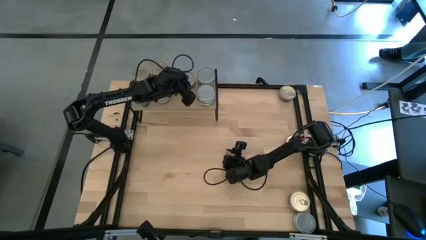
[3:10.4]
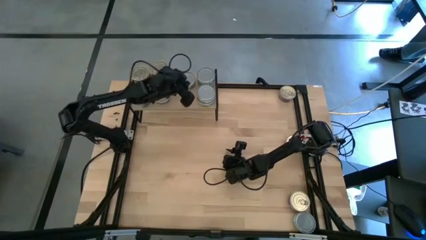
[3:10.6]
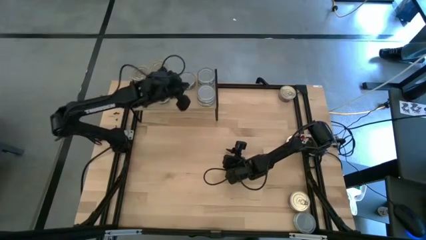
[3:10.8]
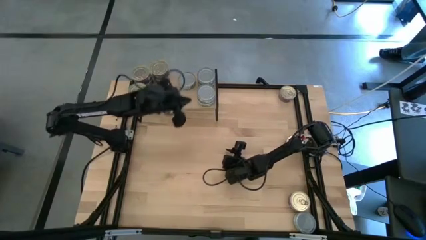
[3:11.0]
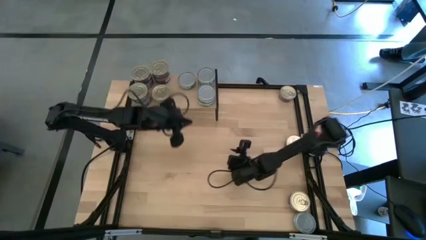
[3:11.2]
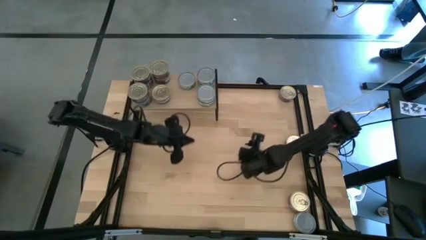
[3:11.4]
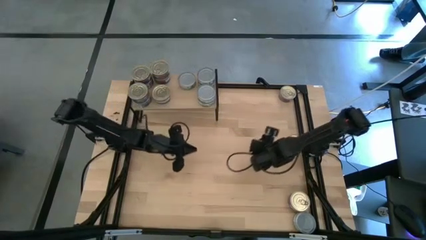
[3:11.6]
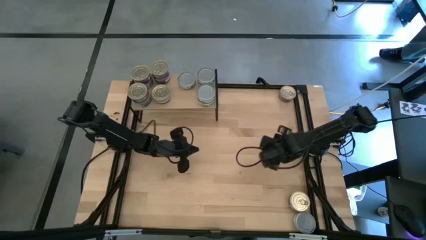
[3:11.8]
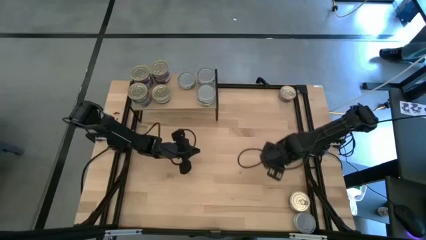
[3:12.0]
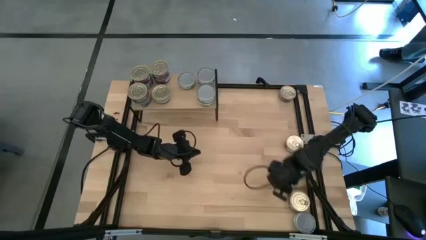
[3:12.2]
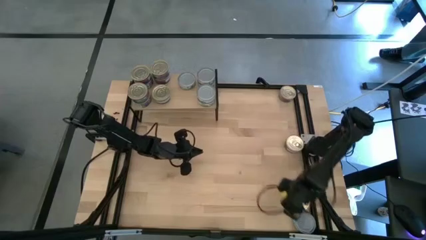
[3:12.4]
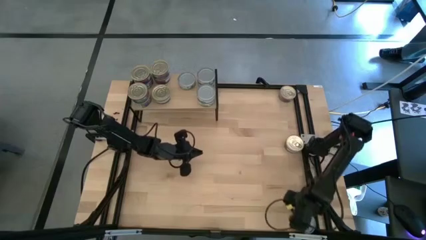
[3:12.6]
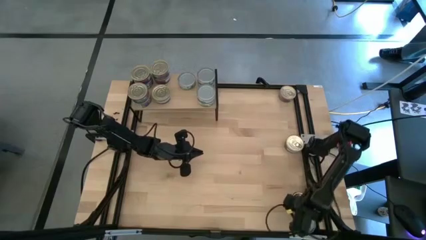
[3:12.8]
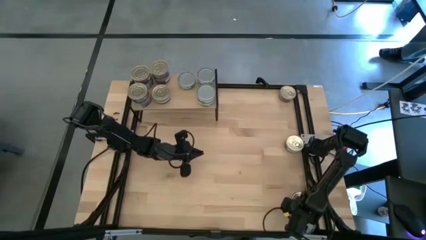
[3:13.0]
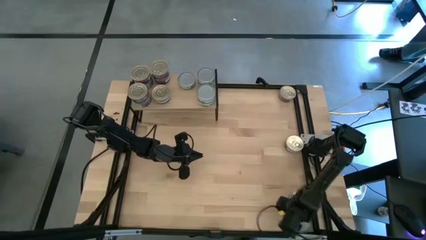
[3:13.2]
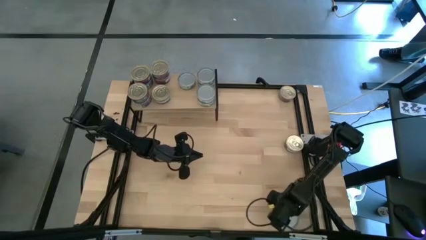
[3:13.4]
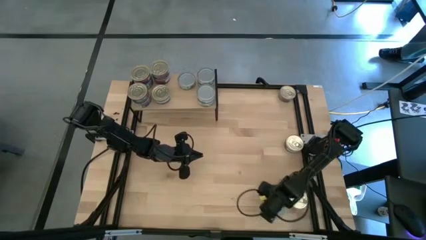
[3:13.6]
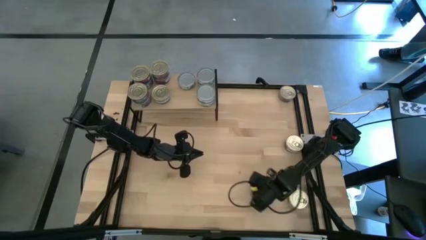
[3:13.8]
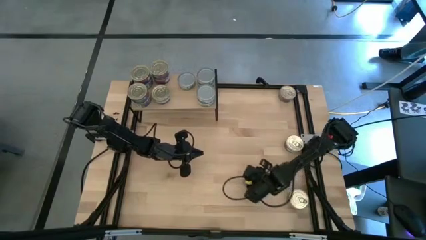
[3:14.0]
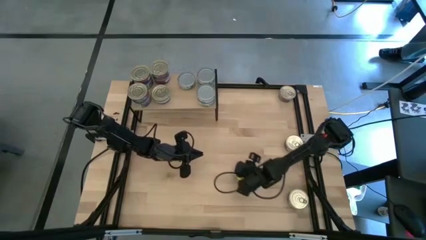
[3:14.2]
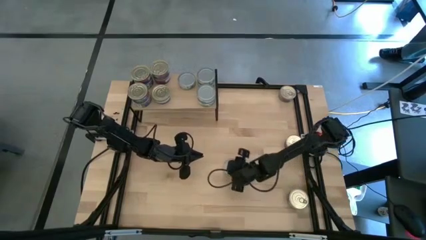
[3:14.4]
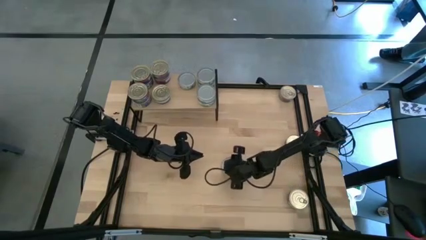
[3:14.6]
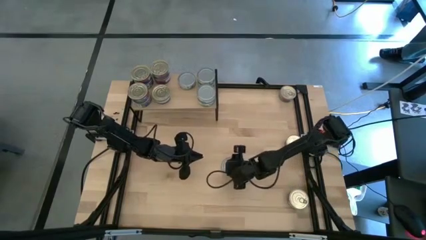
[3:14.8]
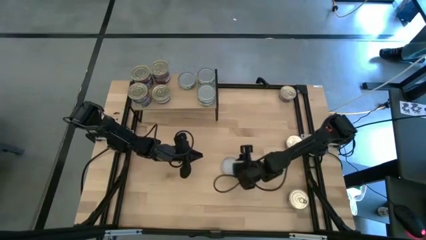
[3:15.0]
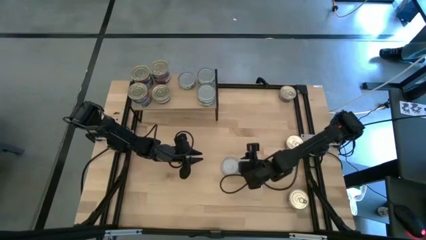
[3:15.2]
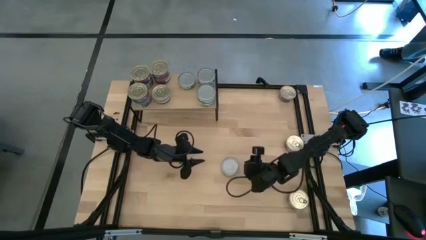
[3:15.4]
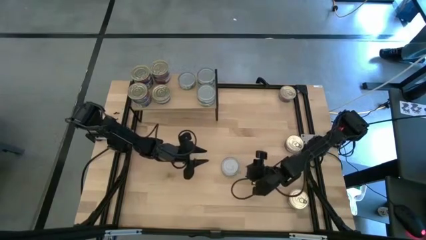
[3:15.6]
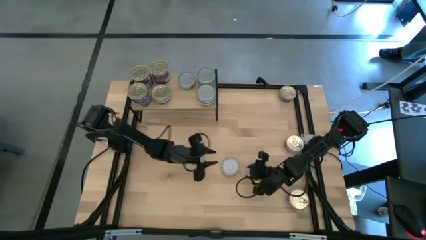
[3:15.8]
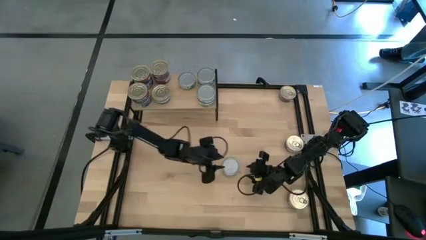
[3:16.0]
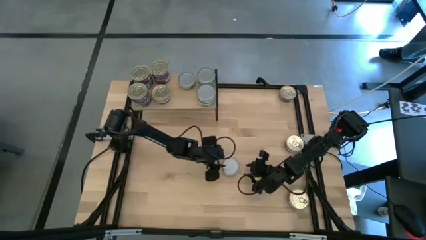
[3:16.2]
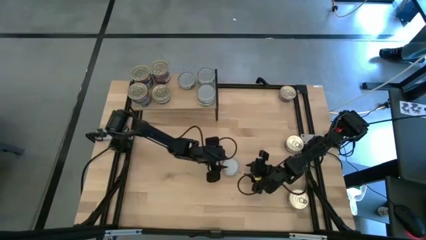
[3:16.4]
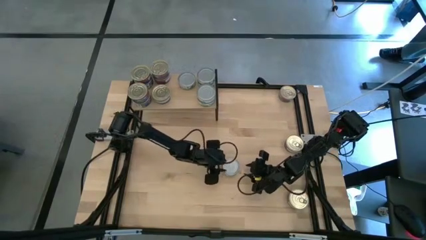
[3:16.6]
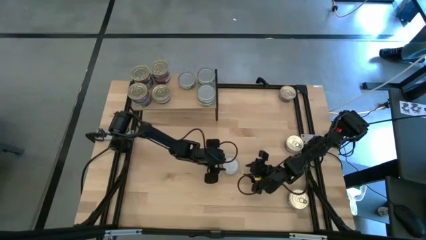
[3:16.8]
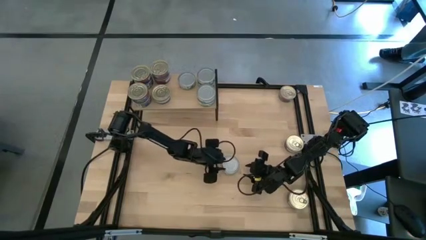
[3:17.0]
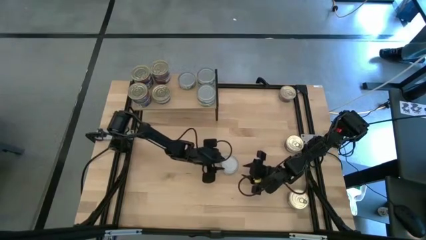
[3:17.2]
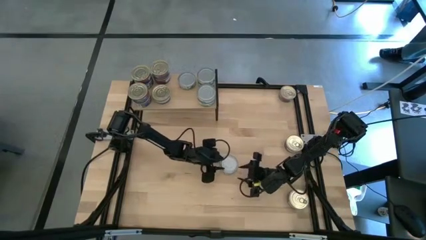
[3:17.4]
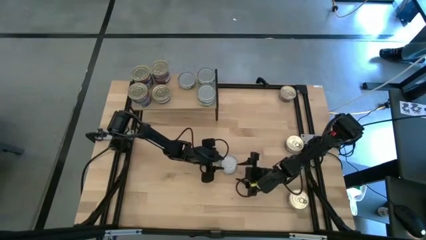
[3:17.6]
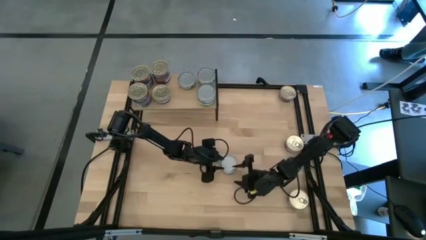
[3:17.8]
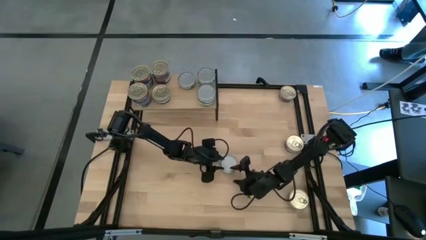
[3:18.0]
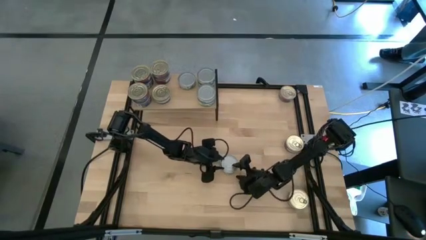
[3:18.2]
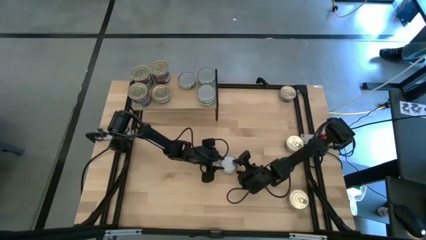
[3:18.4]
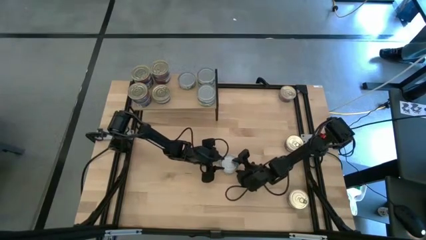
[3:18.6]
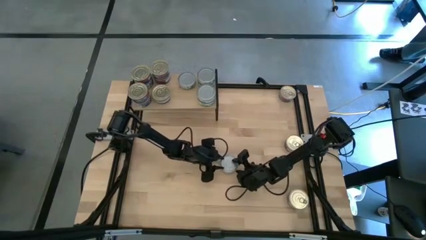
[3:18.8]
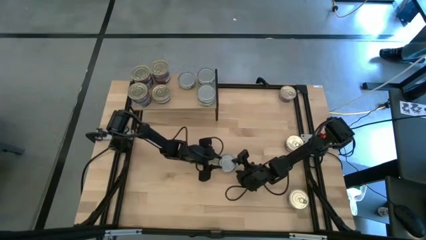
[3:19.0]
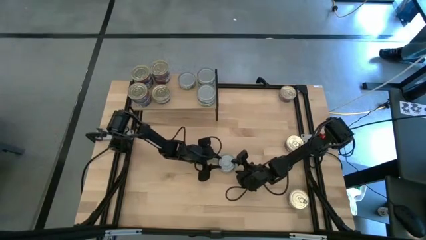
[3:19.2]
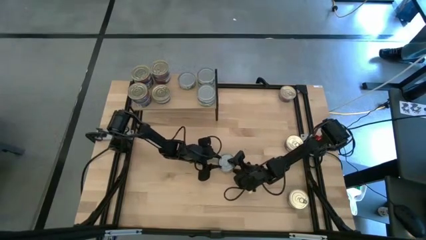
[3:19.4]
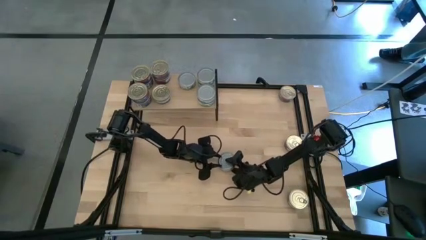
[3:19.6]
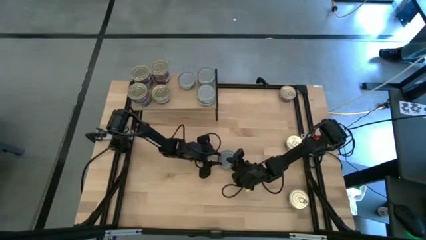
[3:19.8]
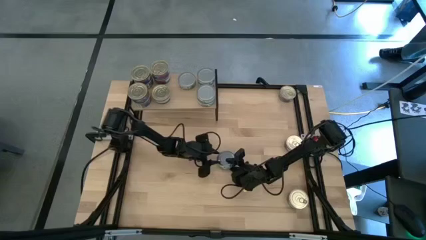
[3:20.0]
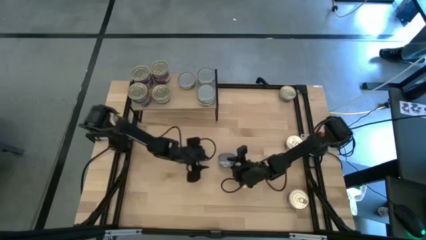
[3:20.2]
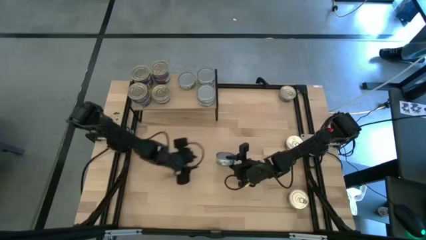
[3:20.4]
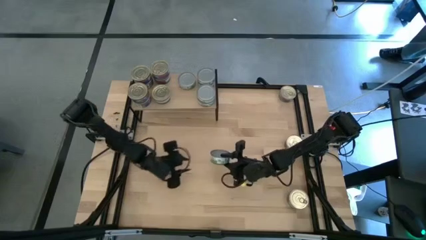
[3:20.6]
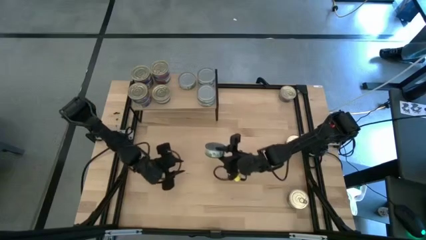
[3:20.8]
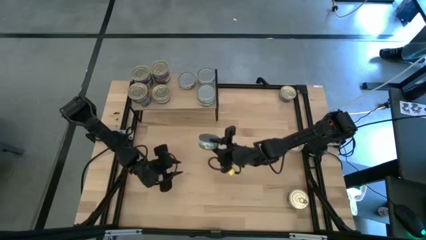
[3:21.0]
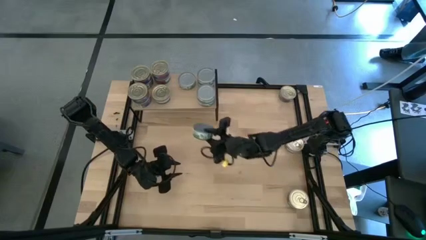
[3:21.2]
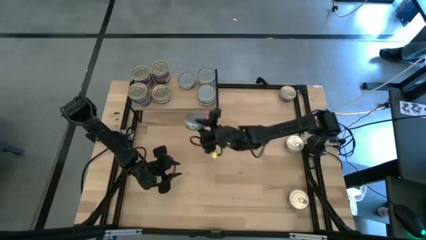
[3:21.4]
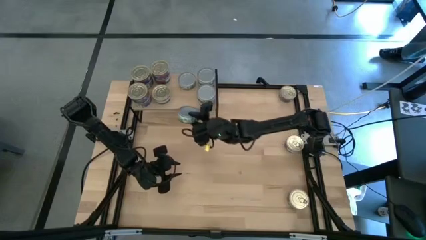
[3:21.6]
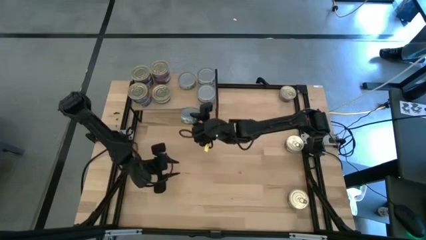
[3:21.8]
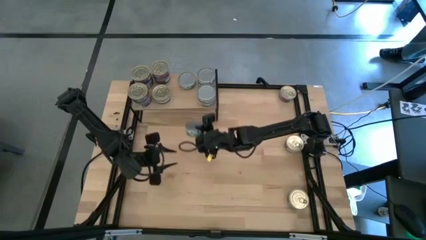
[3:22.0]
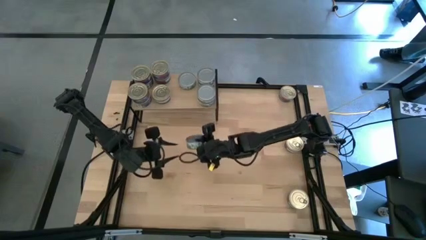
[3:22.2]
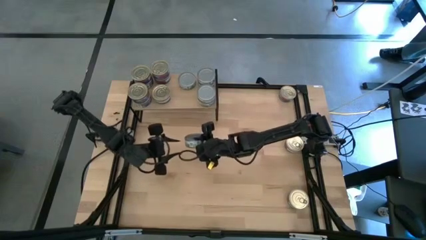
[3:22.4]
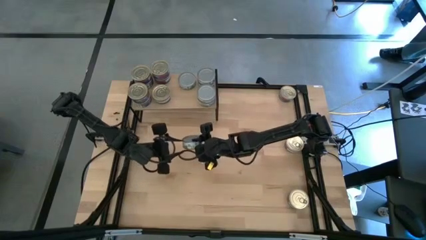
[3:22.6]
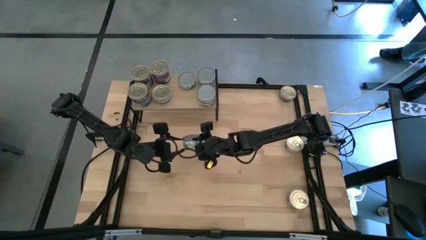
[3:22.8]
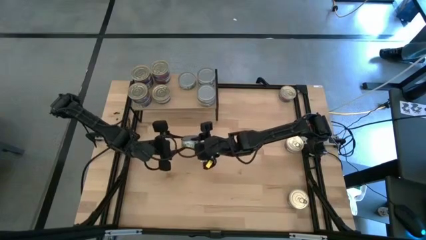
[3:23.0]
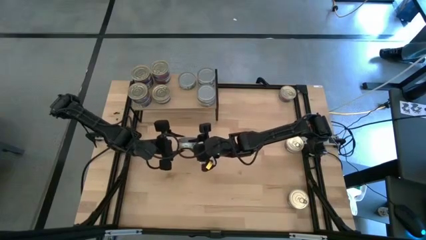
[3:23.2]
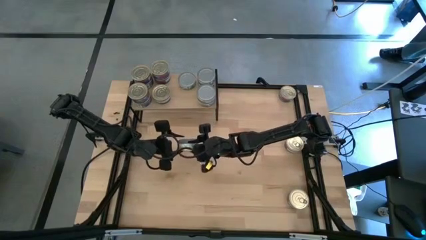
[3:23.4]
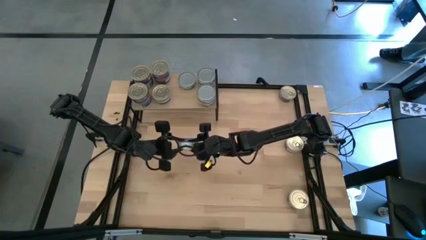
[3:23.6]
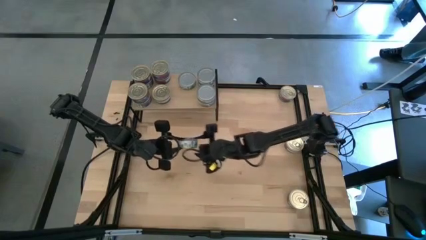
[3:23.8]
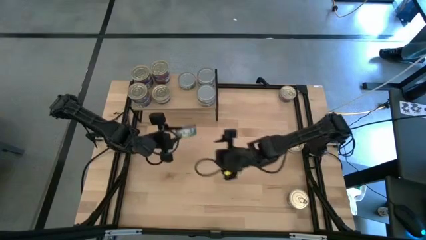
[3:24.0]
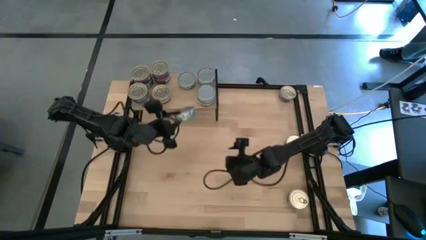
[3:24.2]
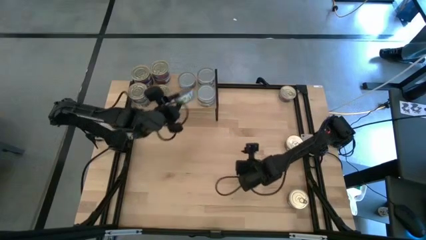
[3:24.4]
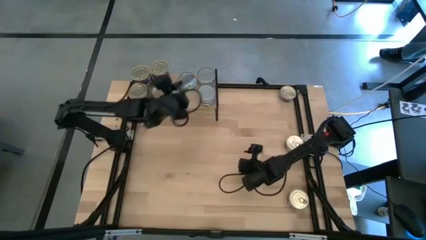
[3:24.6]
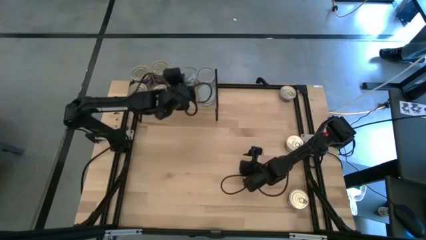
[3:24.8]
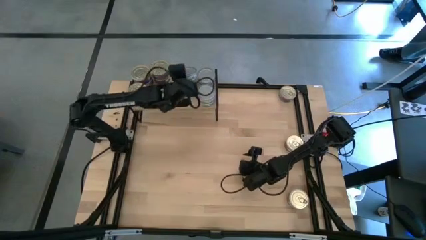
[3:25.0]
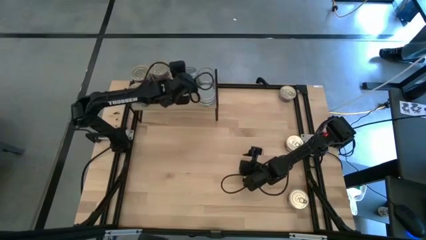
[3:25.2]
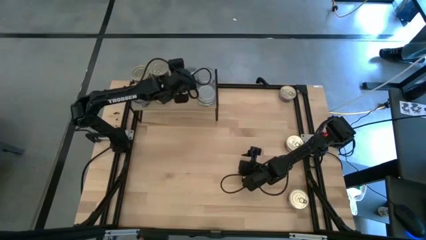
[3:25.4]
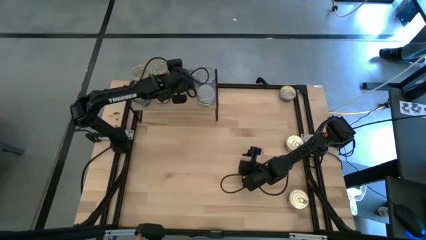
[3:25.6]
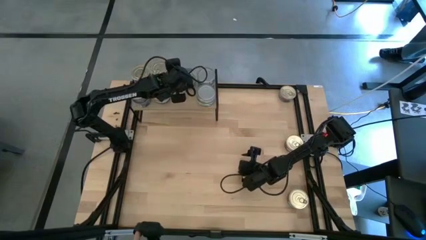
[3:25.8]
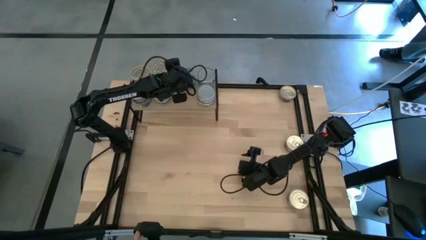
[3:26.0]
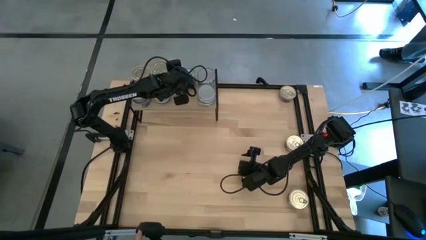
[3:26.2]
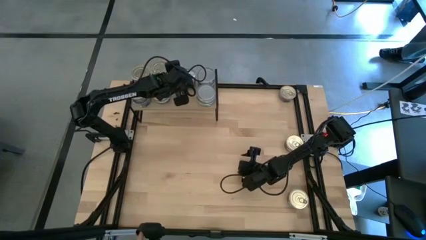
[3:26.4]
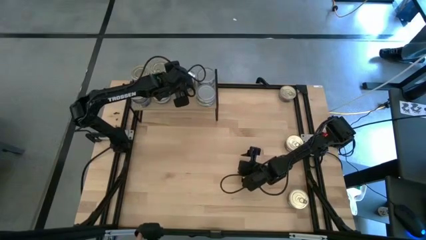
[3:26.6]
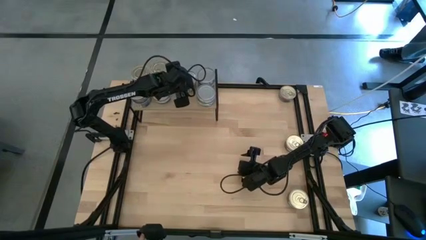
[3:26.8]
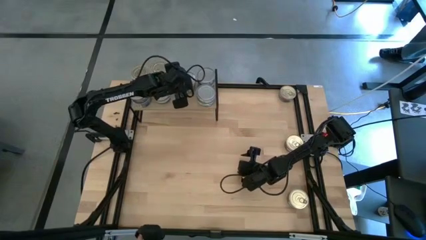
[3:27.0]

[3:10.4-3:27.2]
Task: Stack canned seafood by type on shelf
Stack the green tuna can on top of the green tuna can on the shelf
